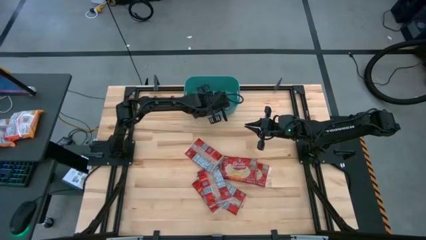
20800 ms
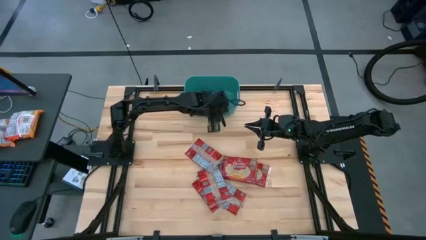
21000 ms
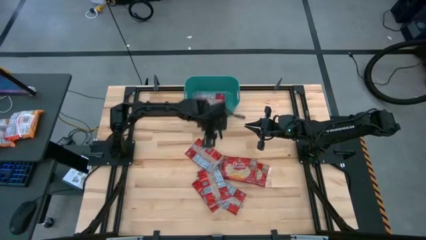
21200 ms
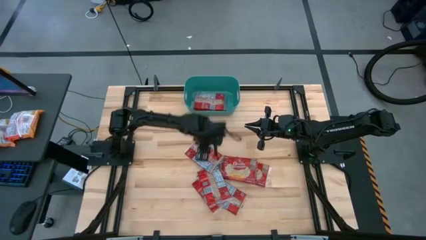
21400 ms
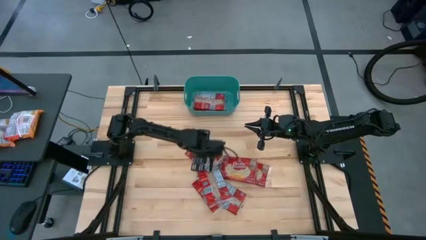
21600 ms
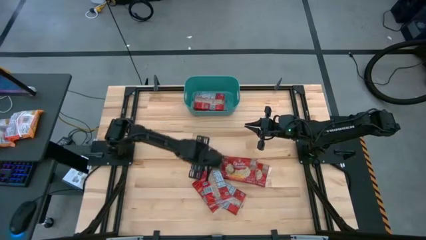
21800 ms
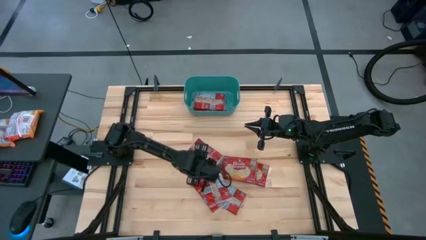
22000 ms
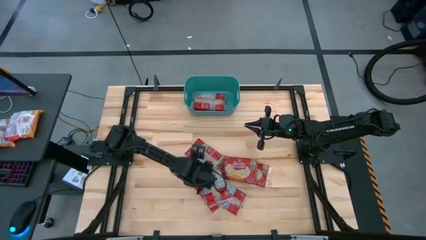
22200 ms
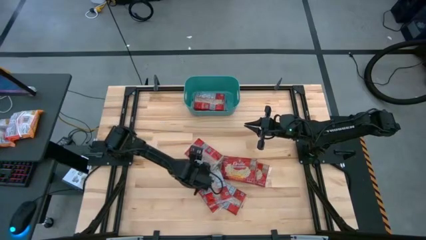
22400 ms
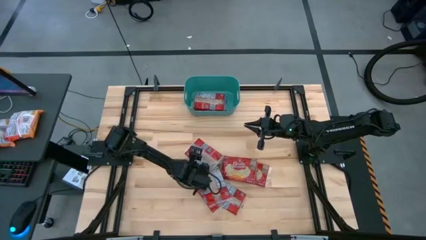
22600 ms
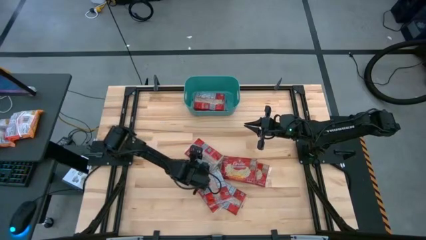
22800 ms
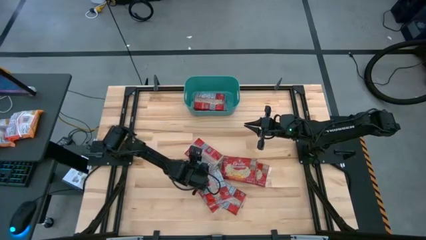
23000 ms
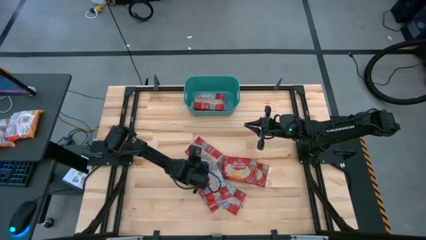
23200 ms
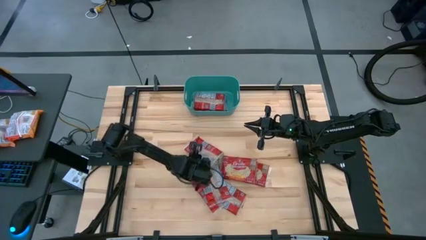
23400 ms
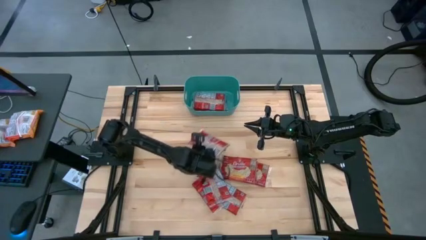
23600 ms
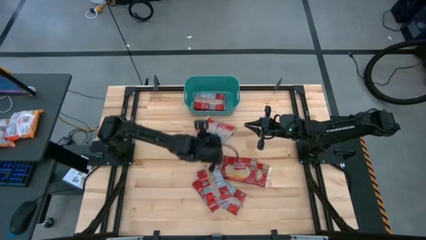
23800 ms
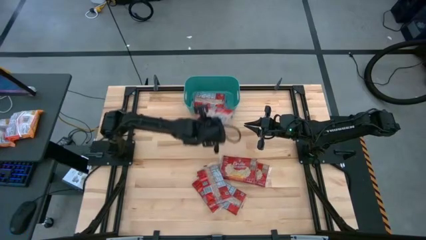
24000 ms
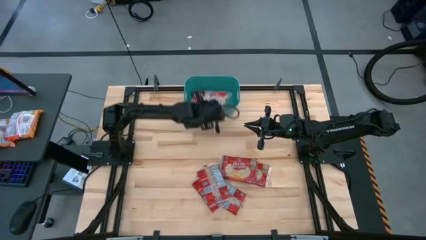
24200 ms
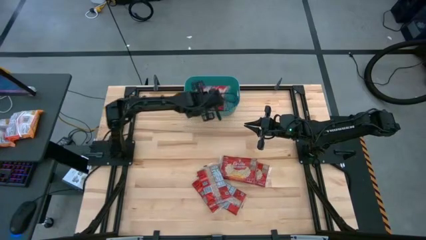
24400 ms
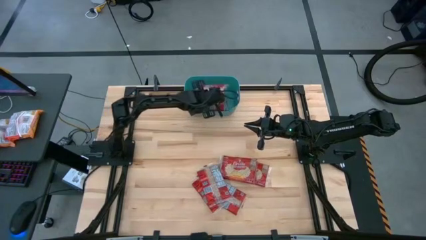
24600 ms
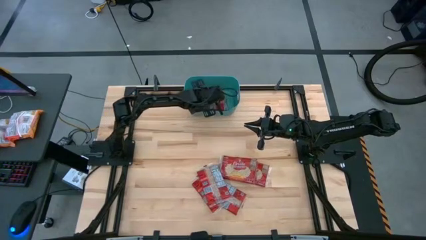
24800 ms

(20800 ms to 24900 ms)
Task: Sort popcorn bags into baskets
Put the popcorn bag into the green bin

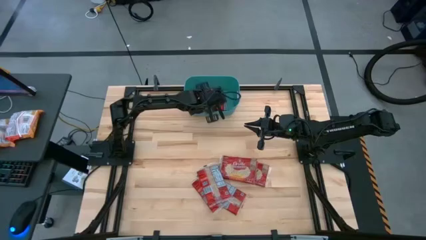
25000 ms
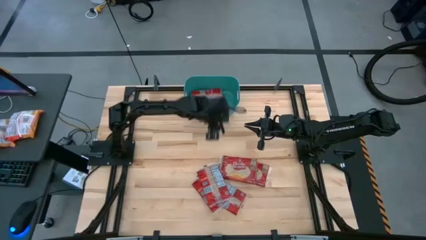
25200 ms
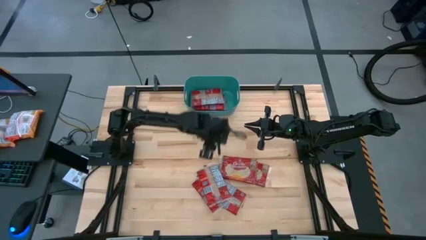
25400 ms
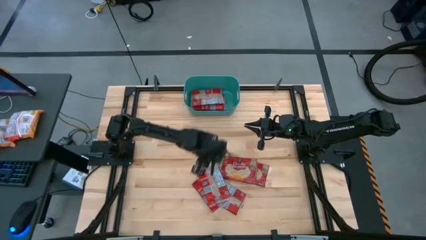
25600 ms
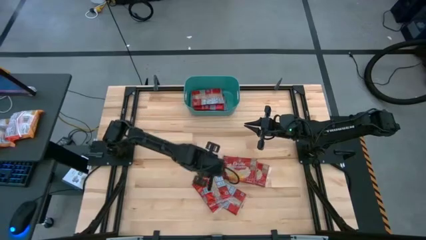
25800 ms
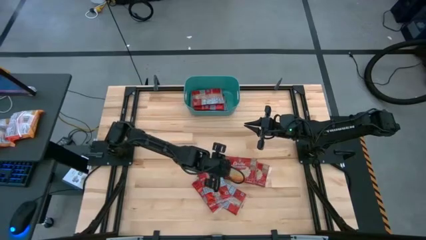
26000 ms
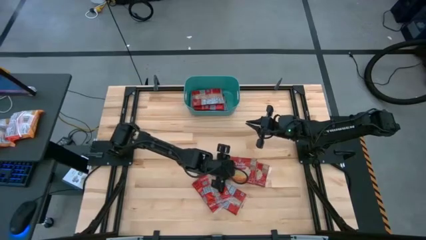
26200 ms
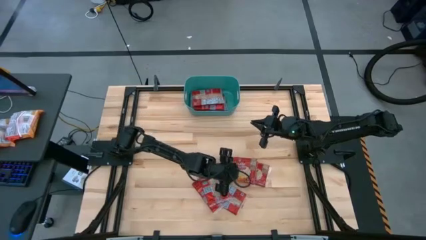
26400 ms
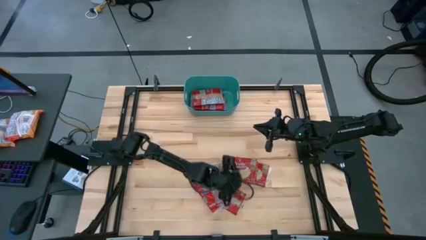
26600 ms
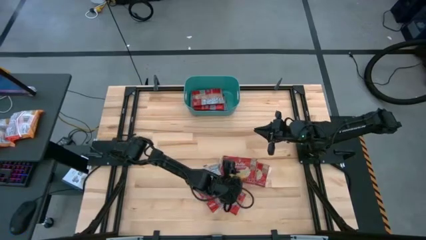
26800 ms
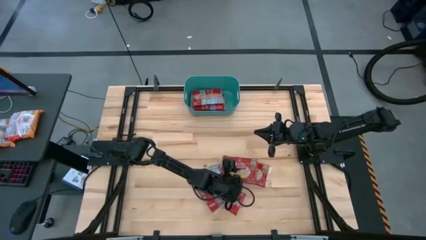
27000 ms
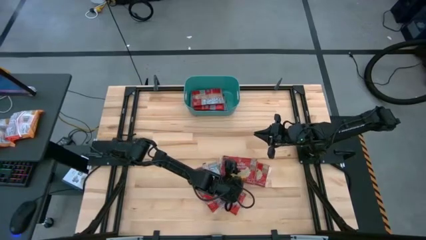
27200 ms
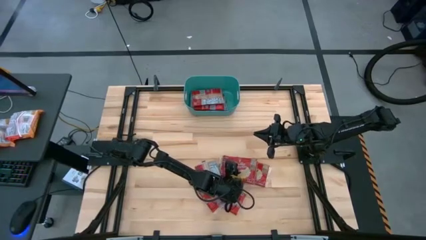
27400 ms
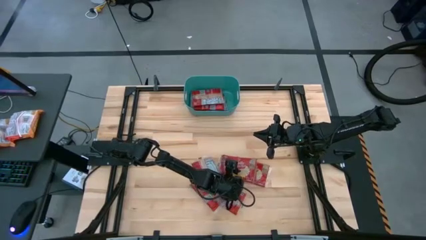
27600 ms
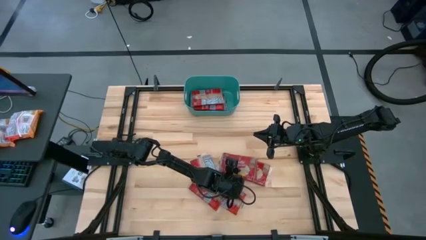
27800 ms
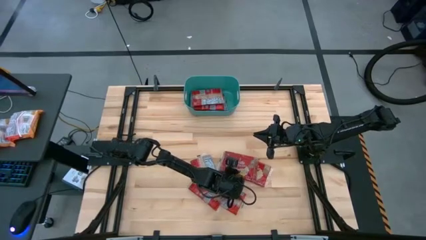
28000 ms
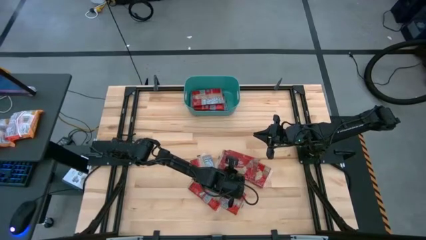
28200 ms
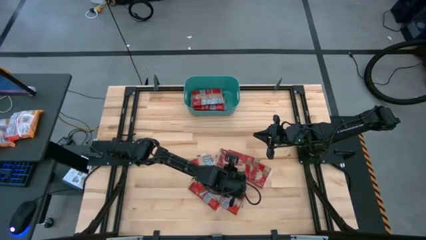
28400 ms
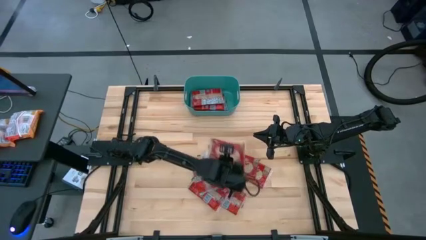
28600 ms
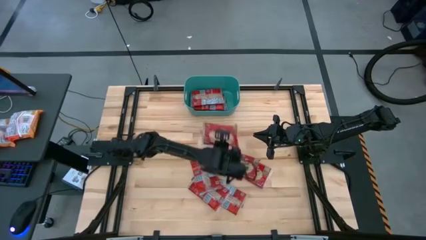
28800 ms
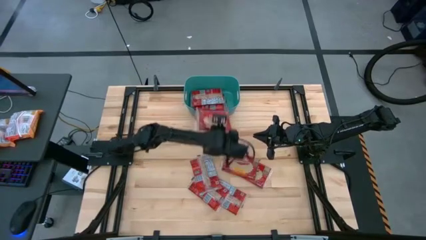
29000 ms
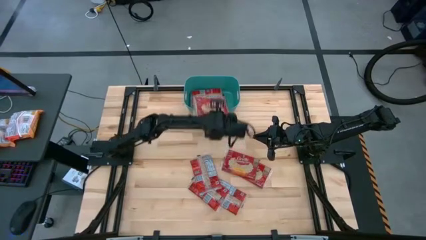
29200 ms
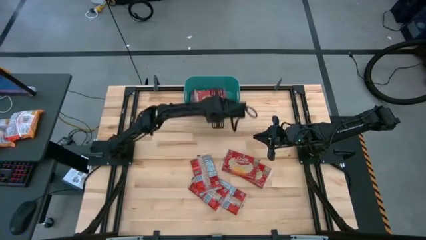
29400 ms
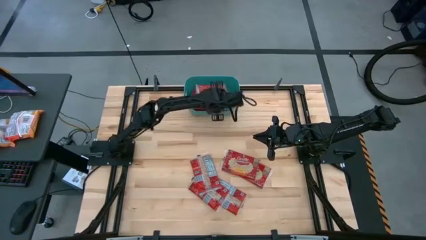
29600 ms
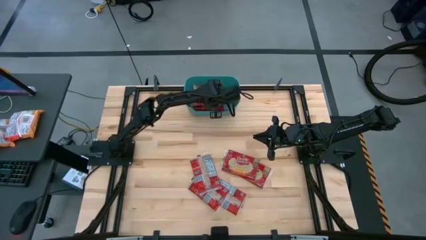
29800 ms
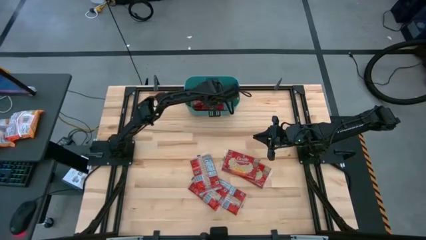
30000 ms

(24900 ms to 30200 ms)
Put the popcorn bag into the green bin

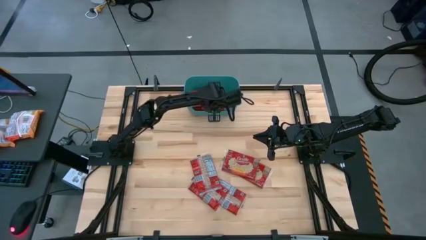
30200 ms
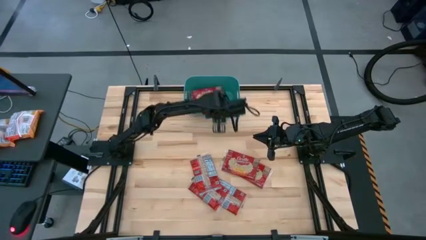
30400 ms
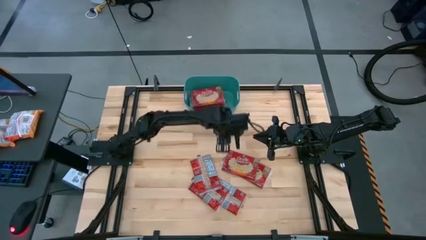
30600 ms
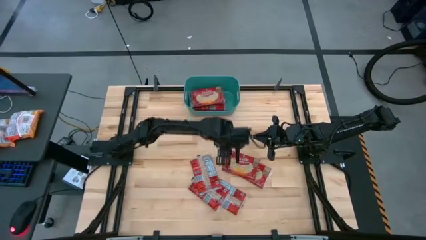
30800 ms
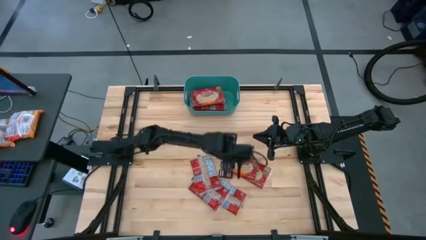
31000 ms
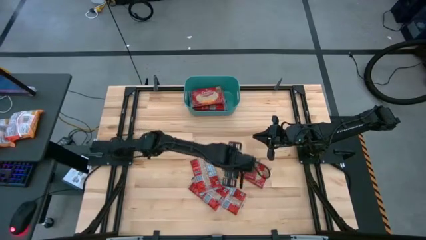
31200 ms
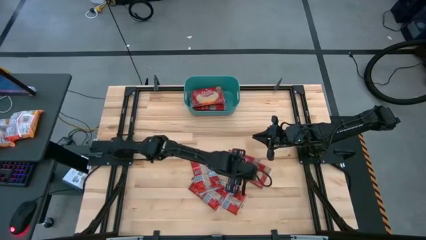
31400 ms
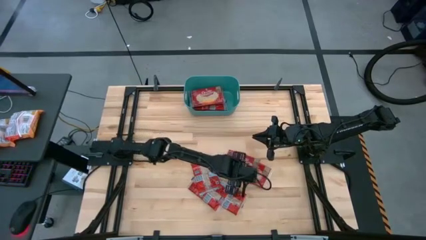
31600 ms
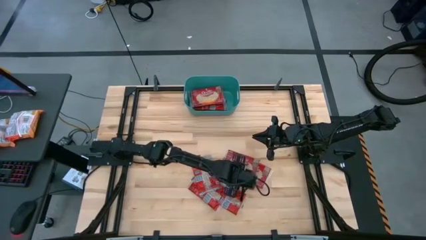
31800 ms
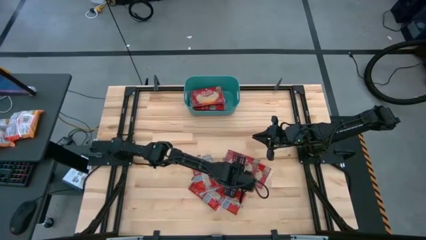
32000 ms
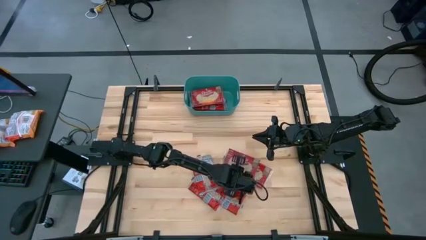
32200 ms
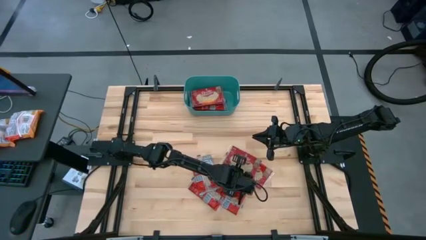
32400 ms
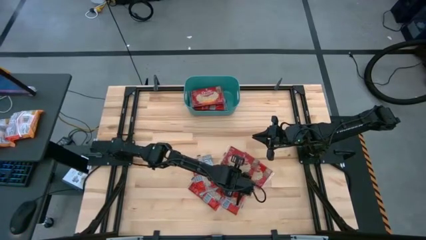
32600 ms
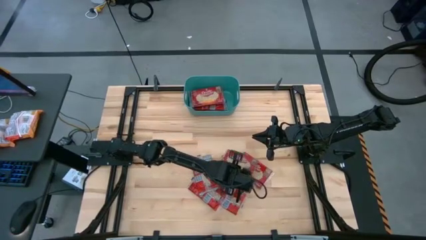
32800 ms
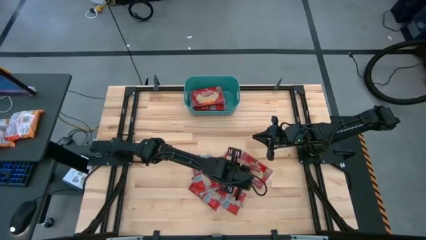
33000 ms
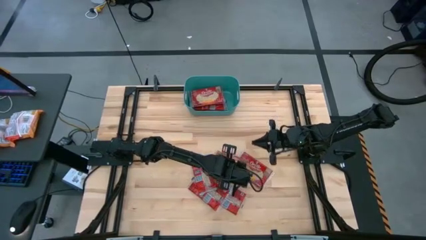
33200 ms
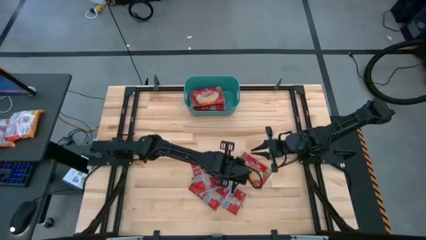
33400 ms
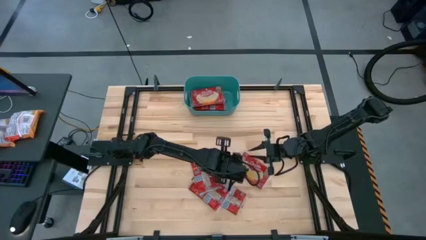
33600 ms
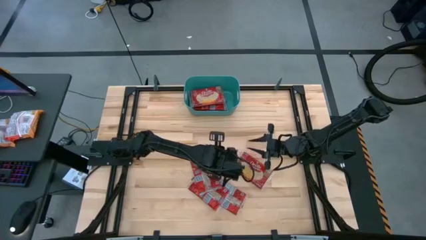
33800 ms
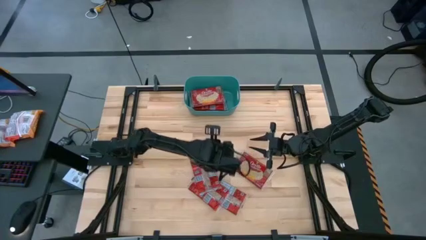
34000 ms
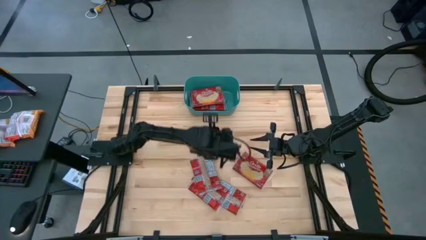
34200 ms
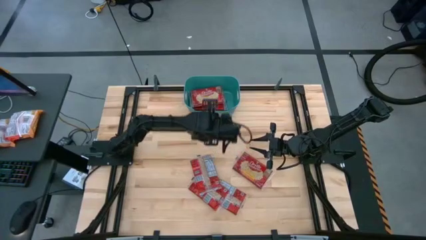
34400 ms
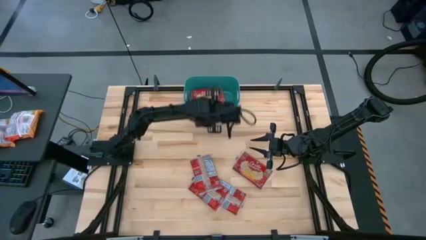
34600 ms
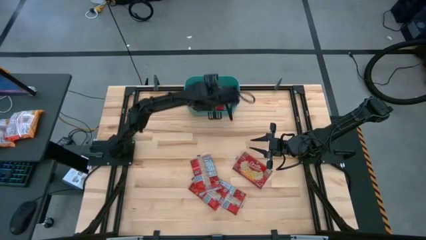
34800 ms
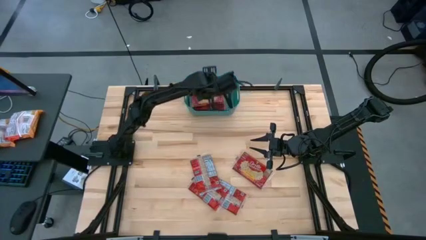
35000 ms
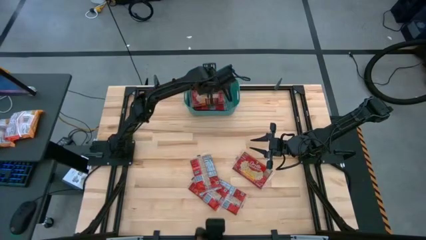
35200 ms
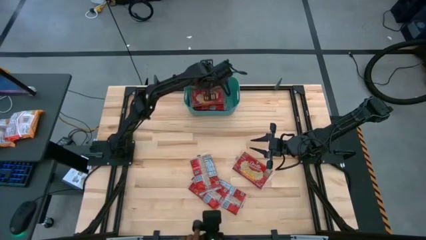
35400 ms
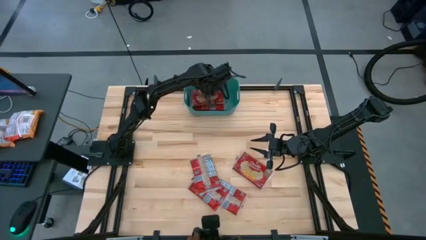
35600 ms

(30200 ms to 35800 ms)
Put the popcorn bag into the green bin

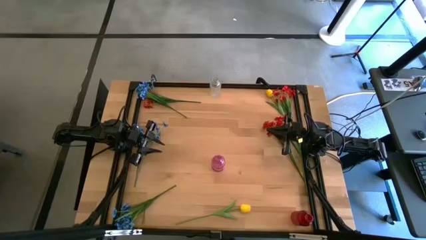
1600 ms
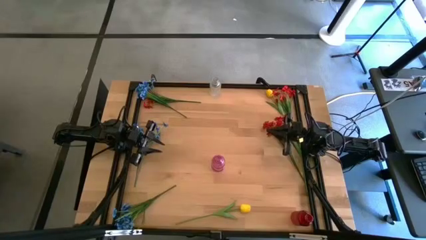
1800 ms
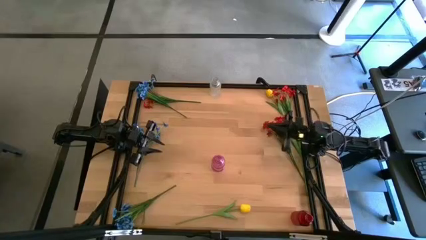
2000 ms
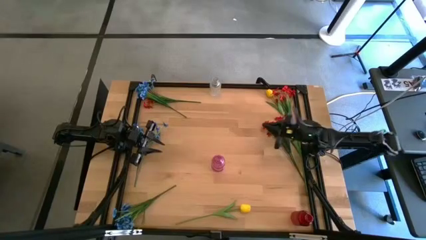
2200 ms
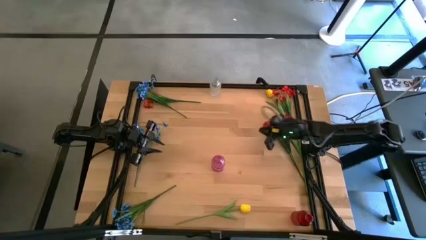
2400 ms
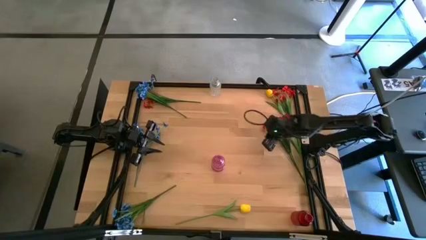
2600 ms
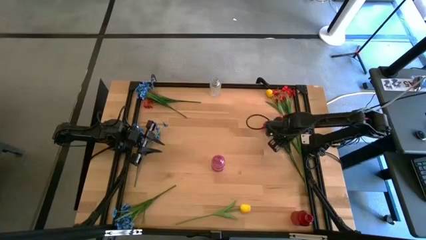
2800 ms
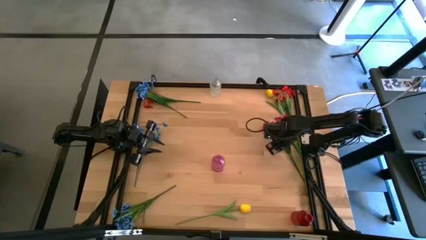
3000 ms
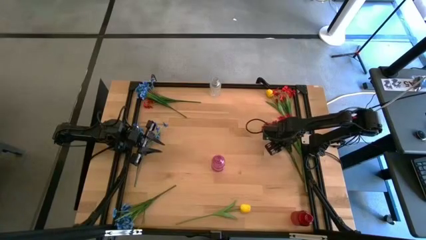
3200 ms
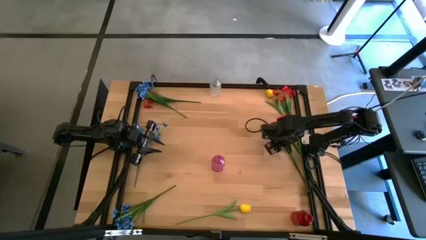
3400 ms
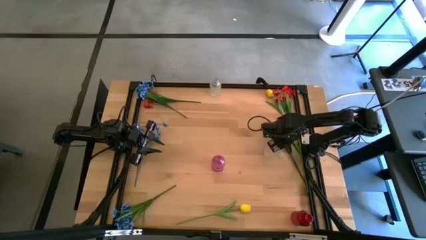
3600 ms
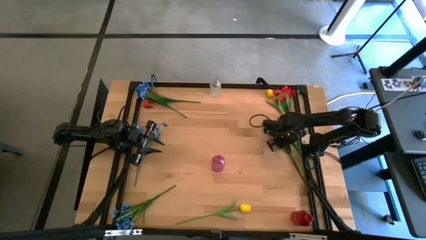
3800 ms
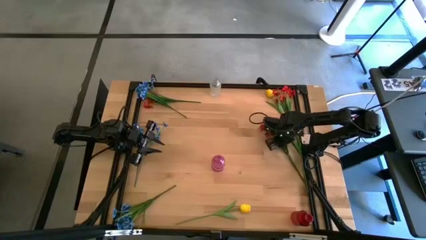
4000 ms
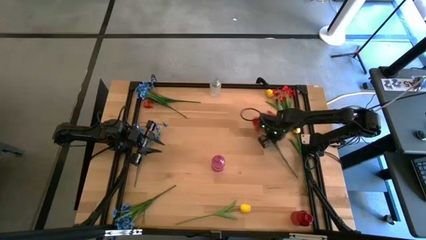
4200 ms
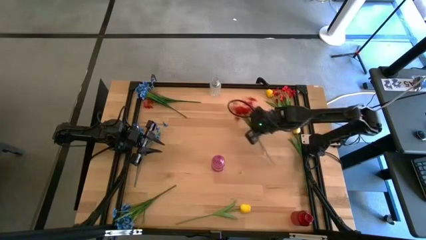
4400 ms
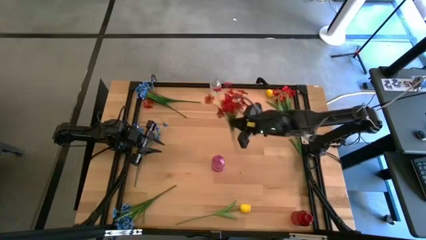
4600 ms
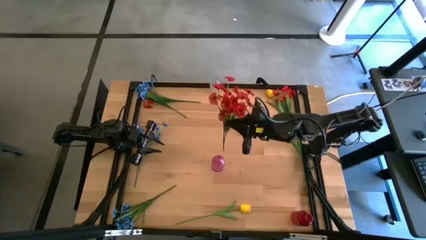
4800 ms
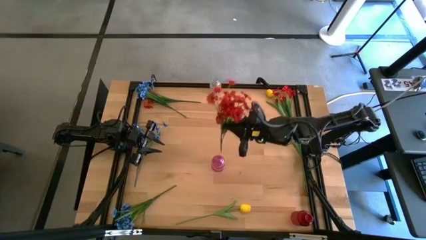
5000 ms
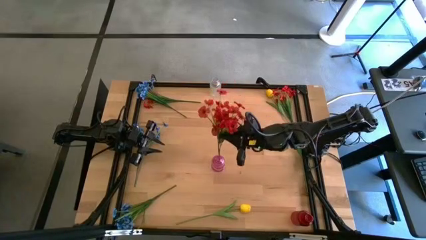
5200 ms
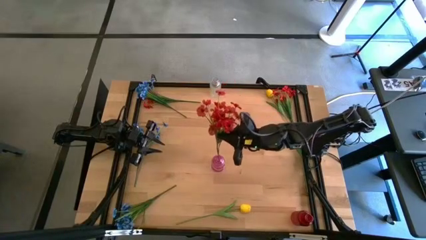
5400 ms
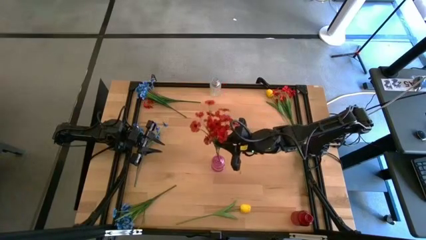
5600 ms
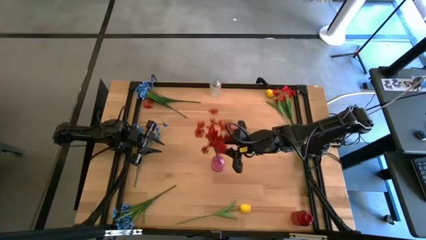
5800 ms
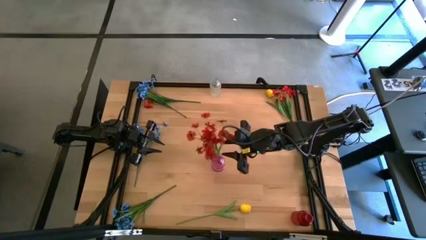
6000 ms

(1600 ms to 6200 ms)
Task: Sort flowers into vase by color
Put the bottom red flowers into the purple vase
